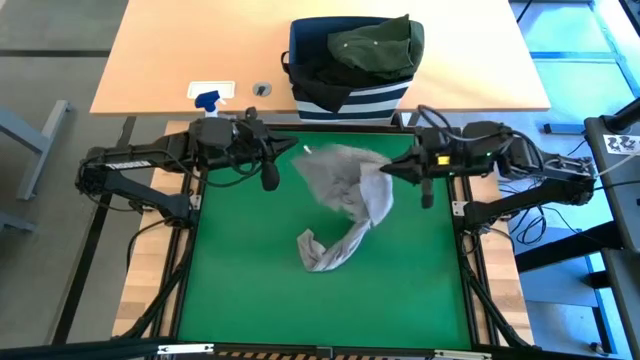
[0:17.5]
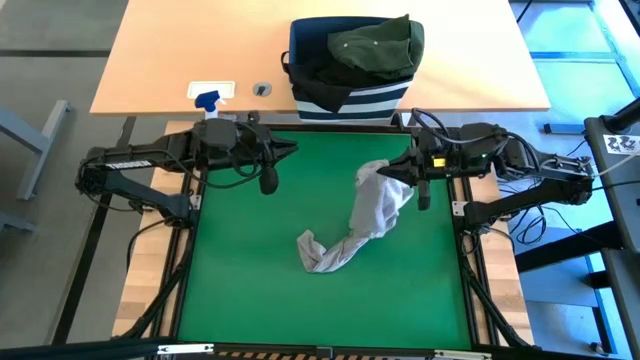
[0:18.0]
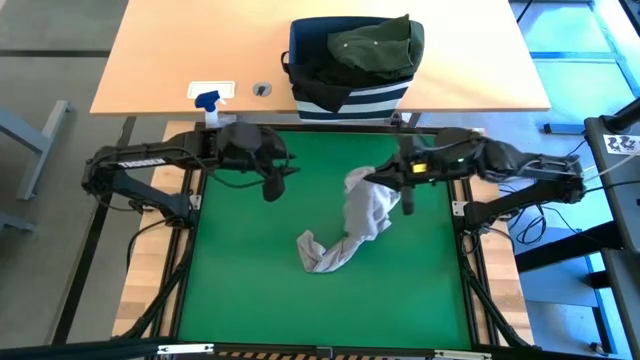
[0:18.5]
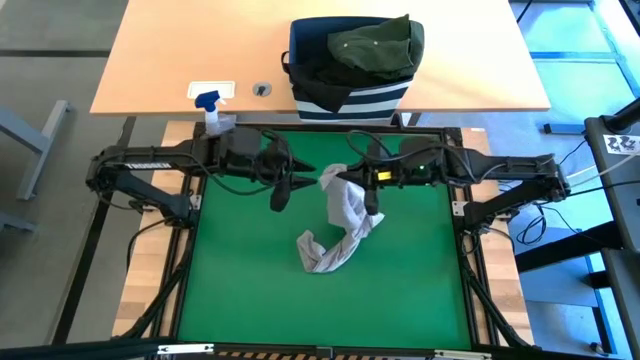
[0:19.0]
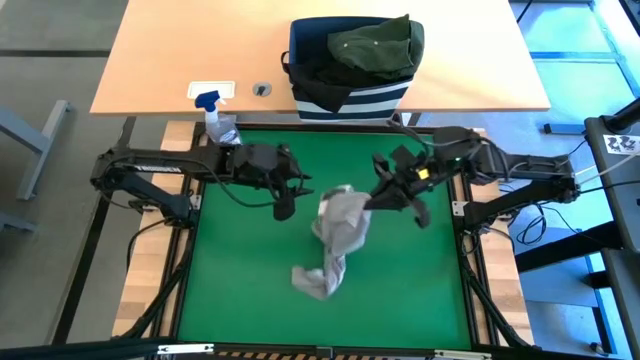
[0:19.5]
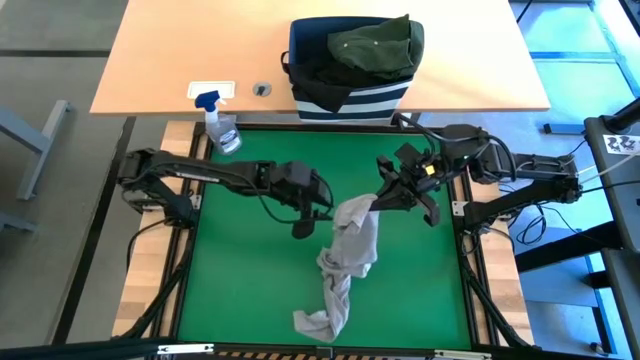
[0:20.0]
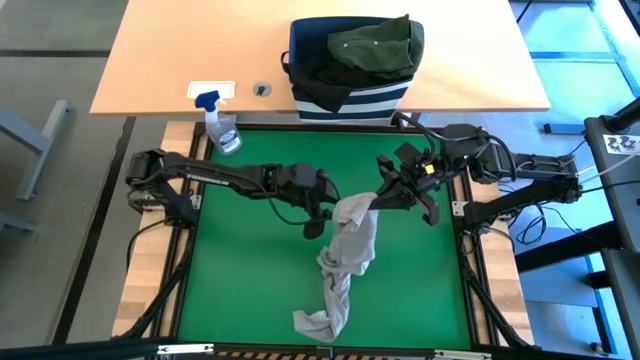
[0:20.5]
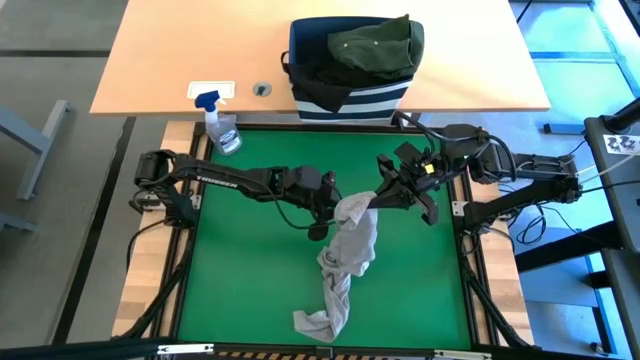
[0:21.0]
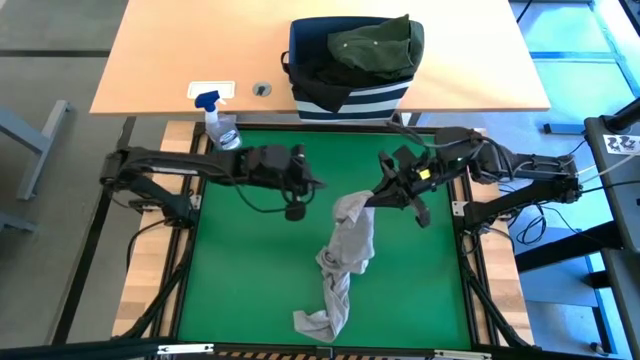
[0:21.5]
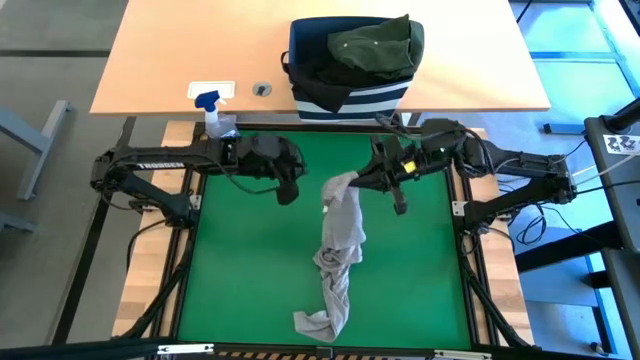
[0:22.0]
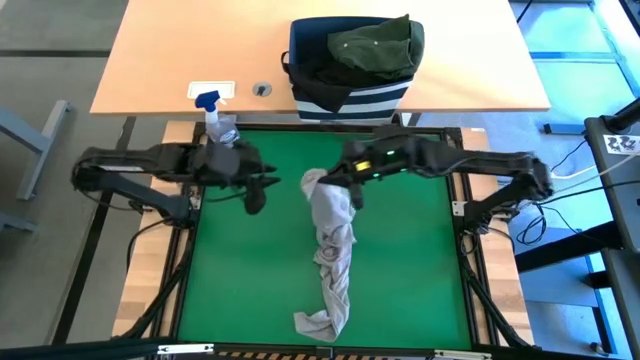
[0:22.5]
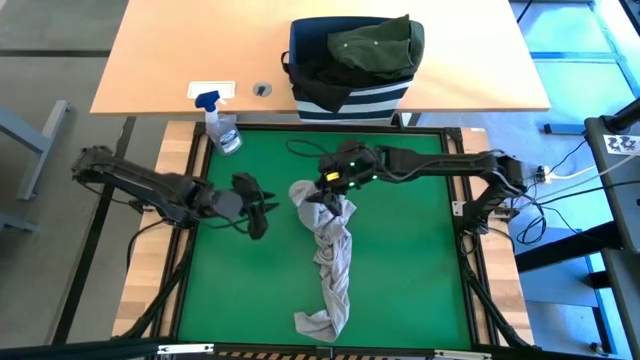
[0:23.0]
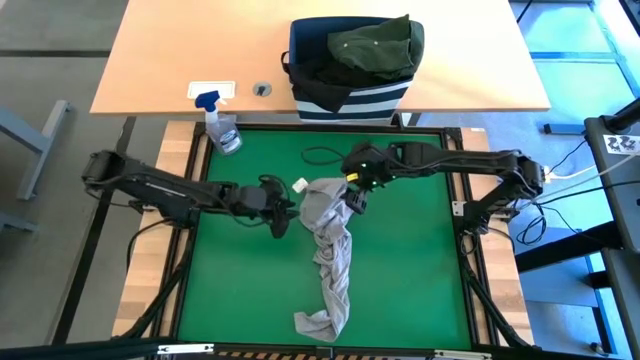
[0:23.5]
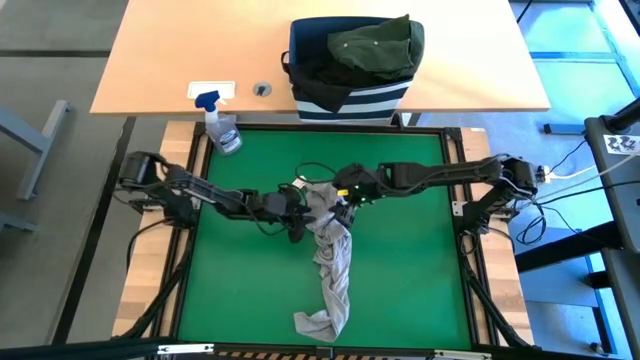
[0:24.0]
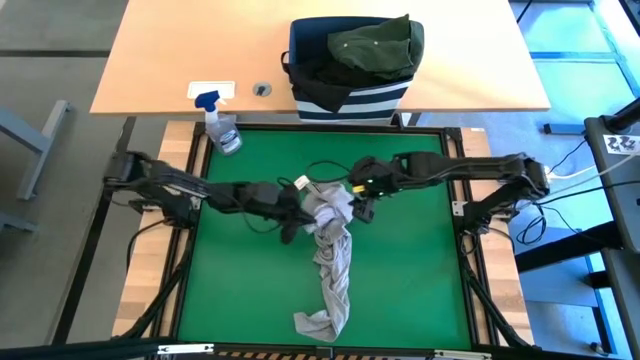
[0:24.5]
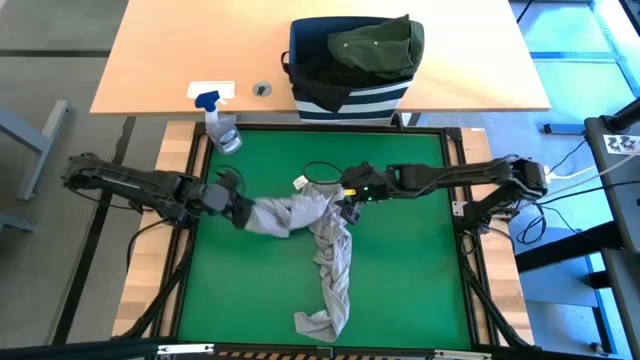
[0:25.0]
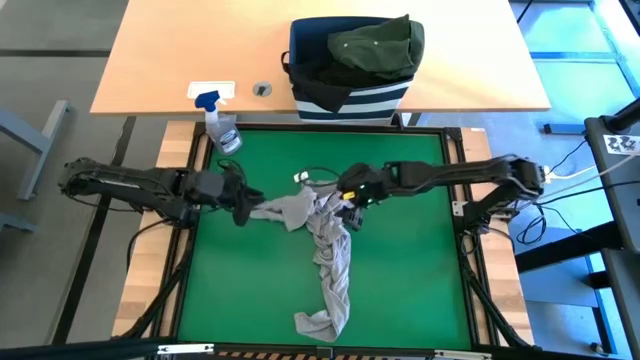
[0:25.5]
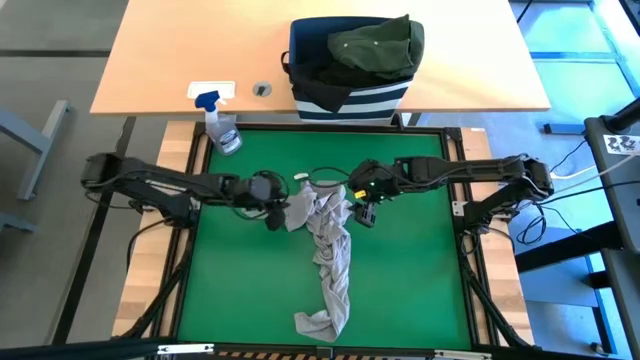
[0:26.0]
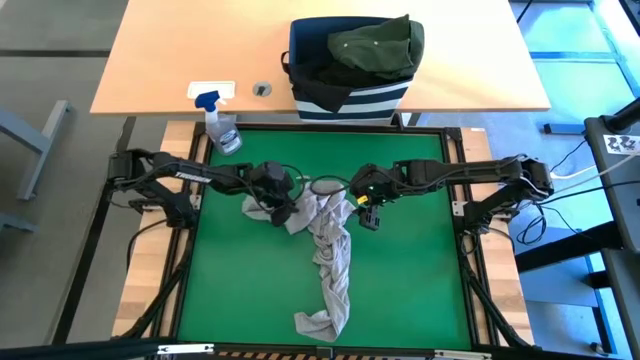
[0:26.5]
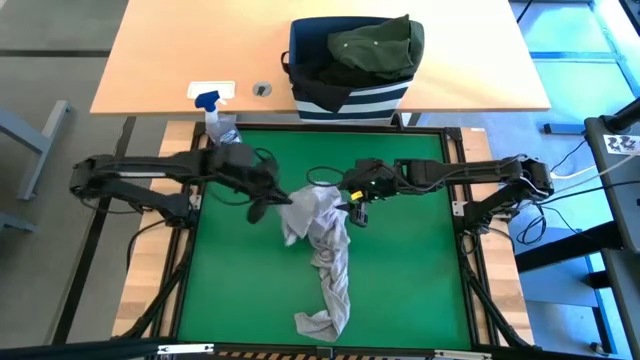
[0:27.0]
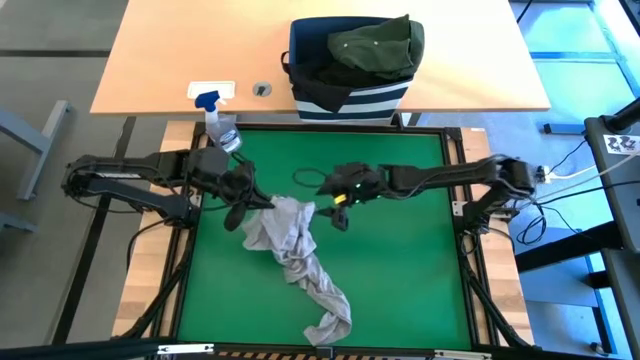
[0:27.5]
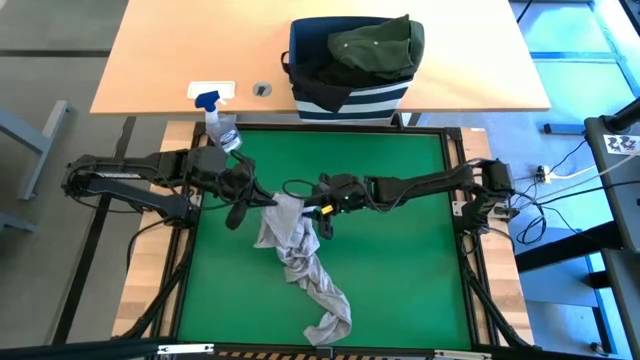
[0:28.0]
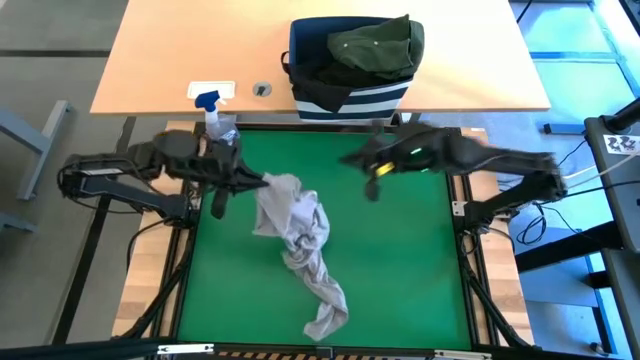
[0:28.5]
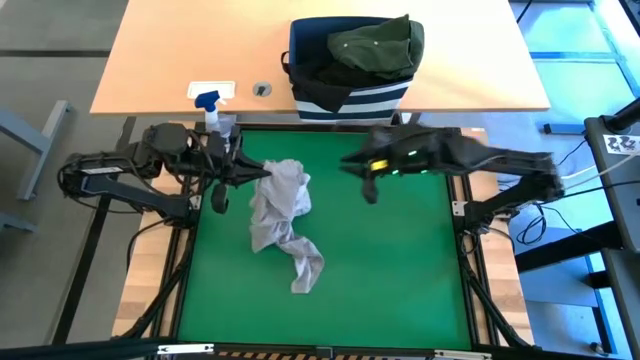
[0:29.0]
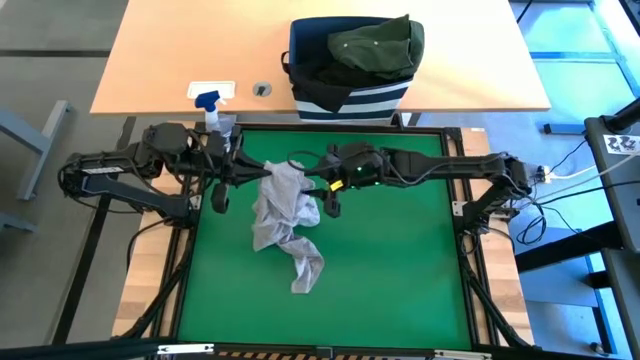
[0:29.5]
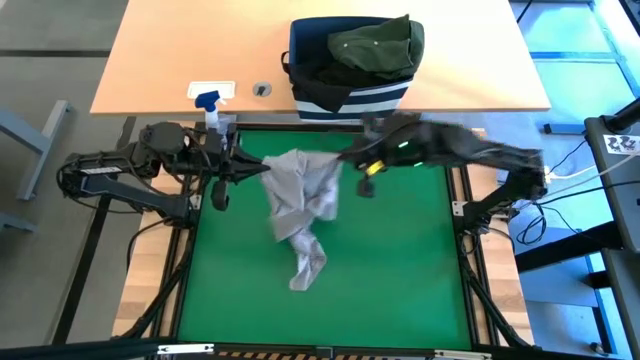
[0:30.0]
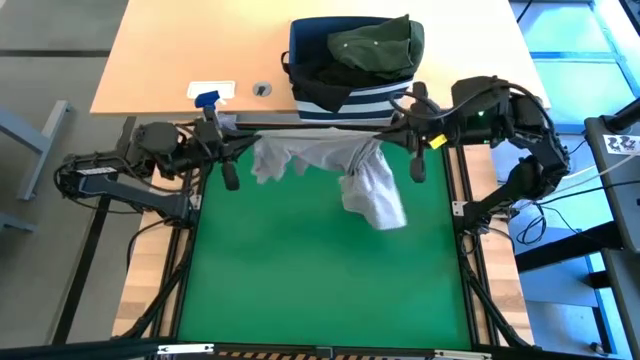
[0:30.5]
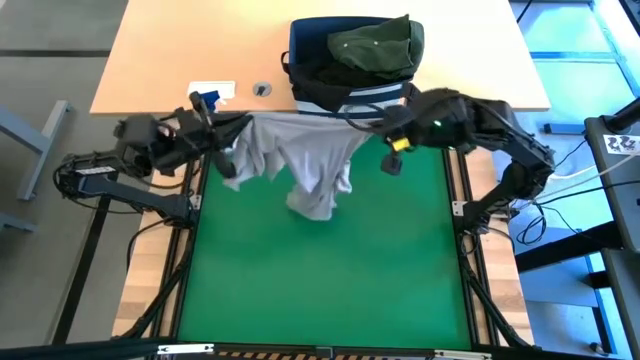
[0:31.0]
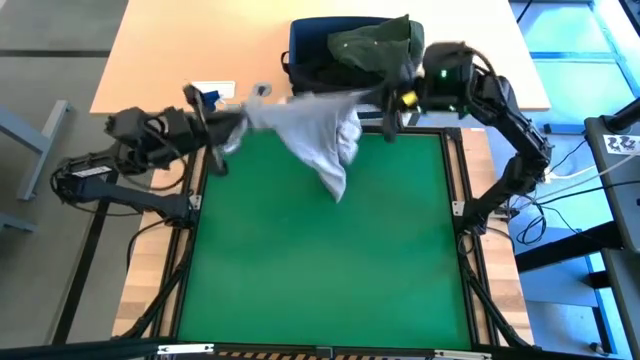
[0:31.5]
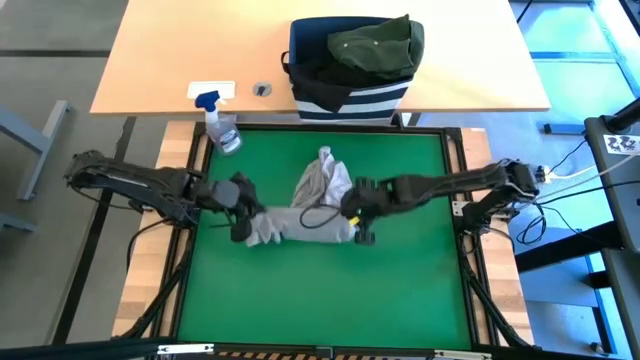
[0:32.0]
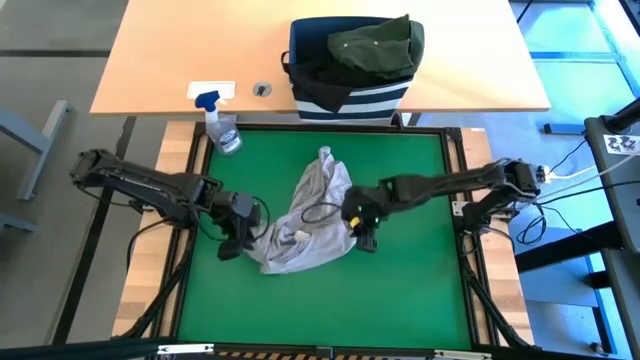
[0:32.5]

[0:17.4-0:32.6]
Task: Fold Laundry from Bin
Fold the gray shirt

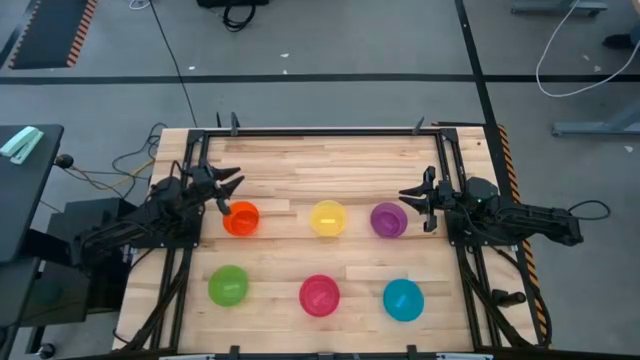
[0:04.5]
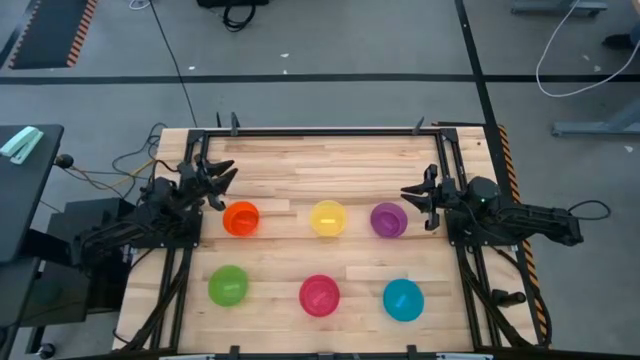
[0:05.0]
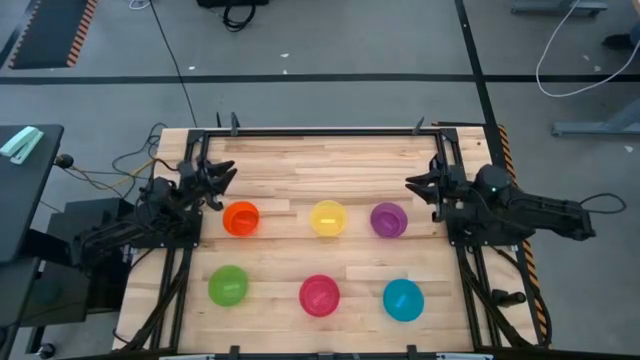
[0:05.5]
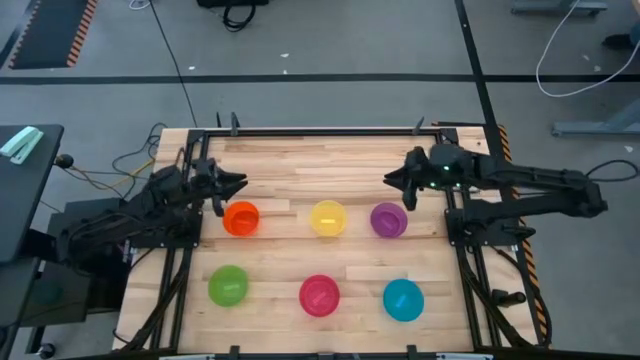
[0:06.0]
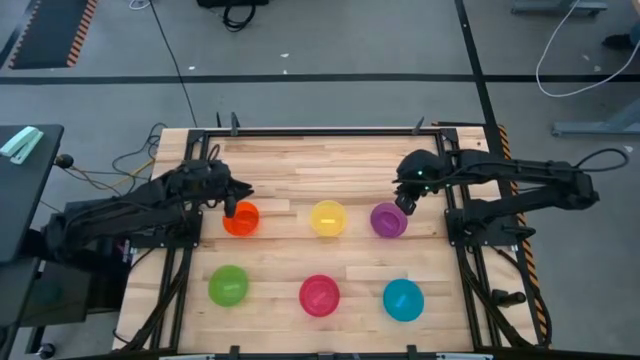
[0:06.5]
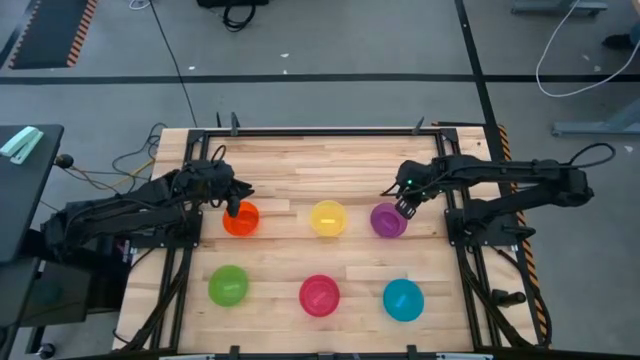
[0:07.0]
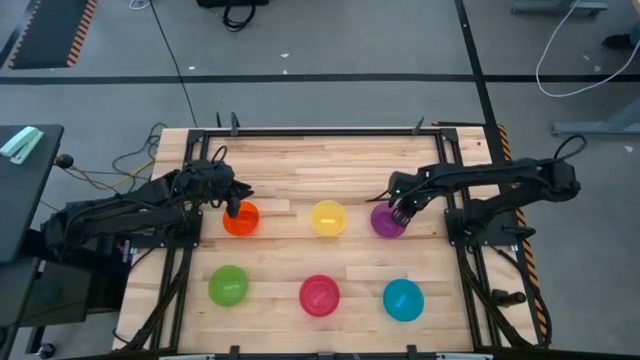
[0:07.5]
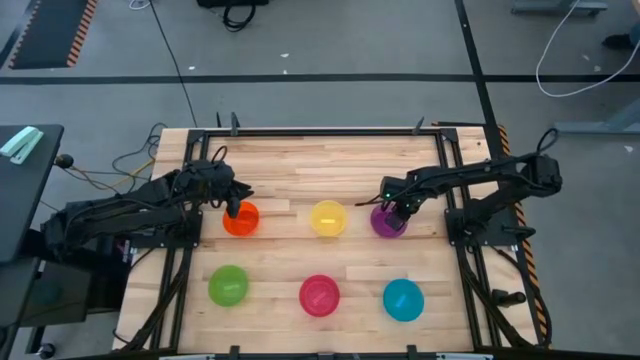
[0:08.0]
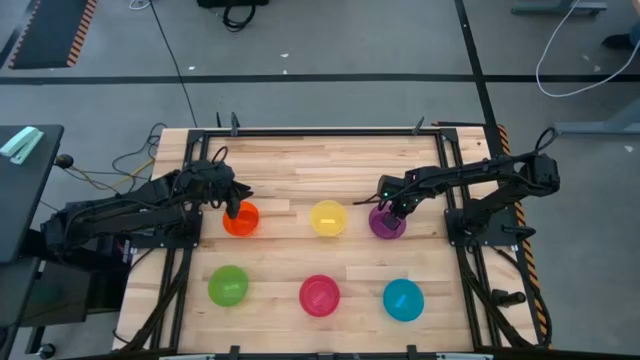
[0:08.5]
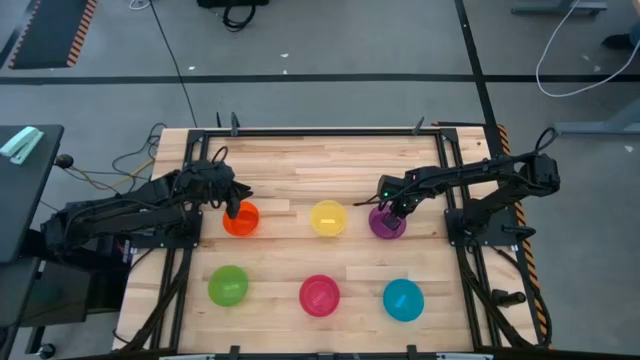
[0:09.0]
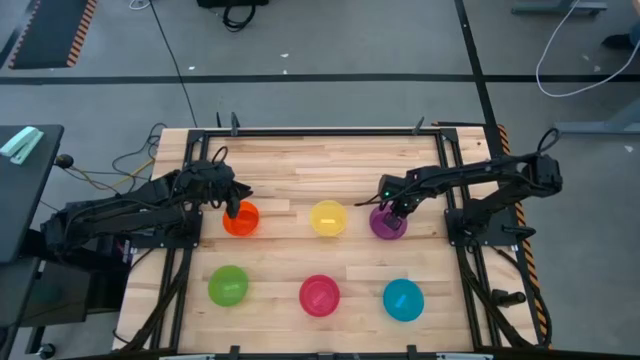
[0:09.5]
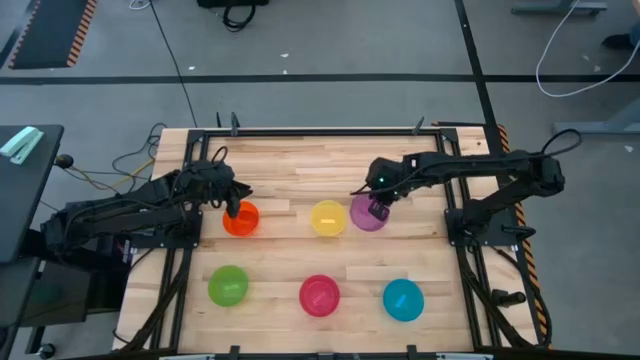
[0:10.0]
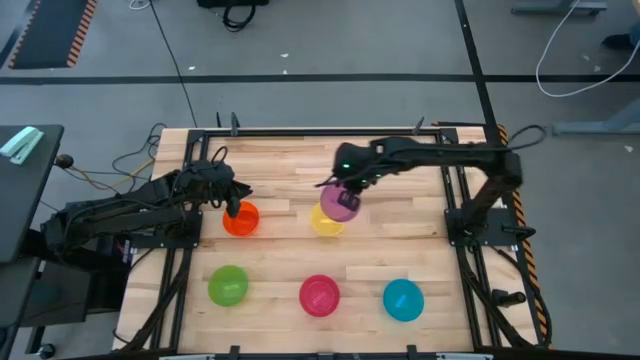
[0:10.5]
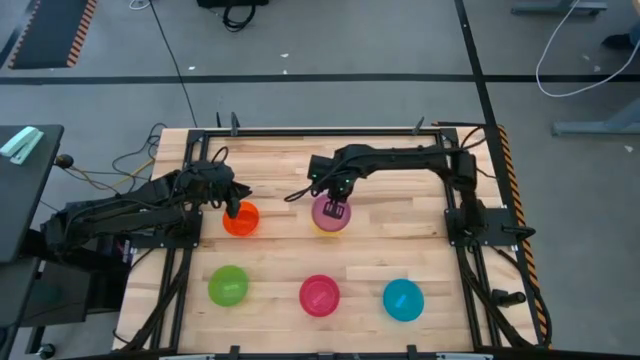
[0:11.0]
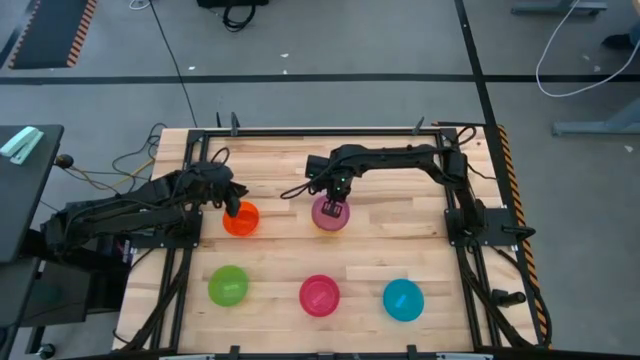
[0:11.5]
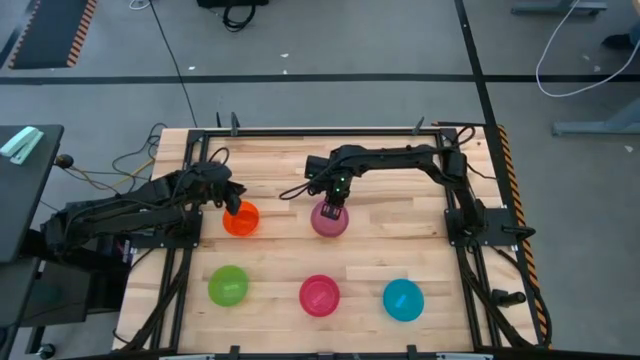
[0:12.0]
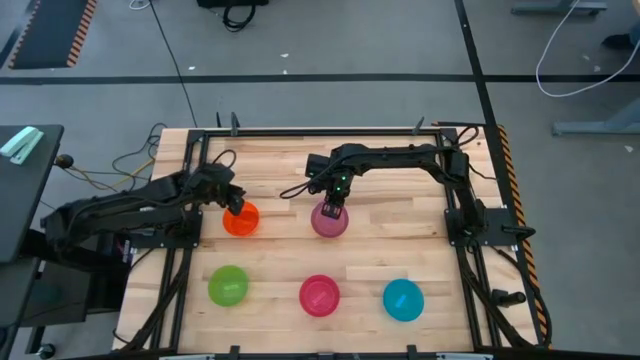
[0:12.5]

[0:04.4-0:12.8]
Task: Nest bowls inside each other
Stack the violet bowl onto the yellow bowl
